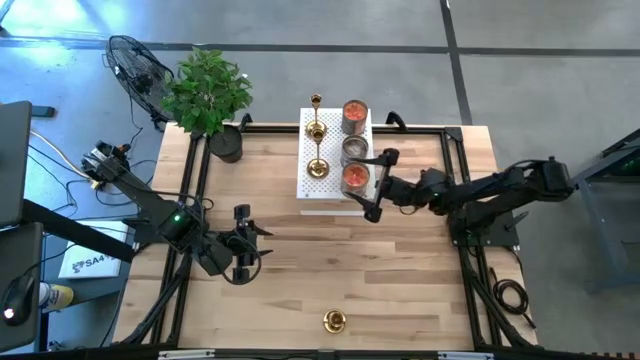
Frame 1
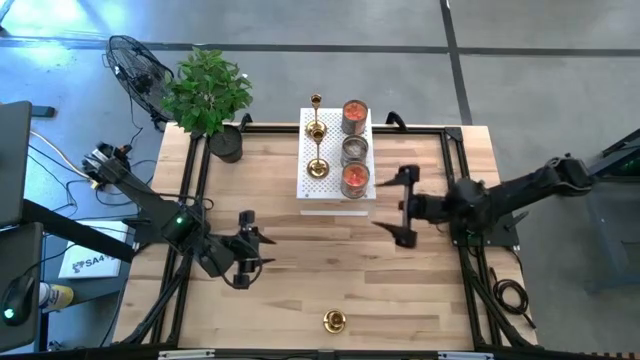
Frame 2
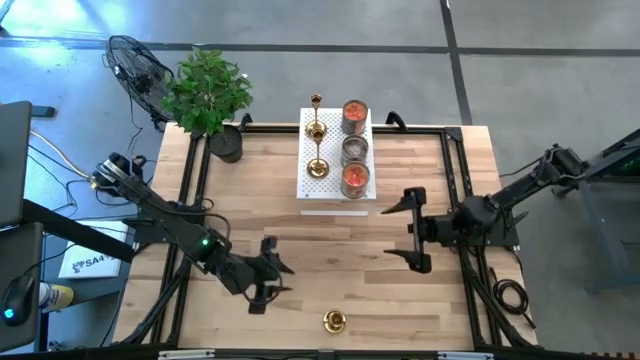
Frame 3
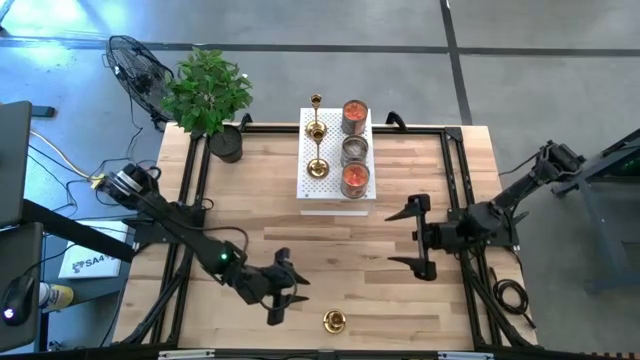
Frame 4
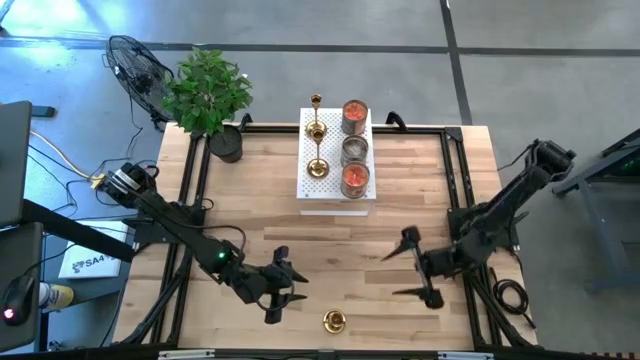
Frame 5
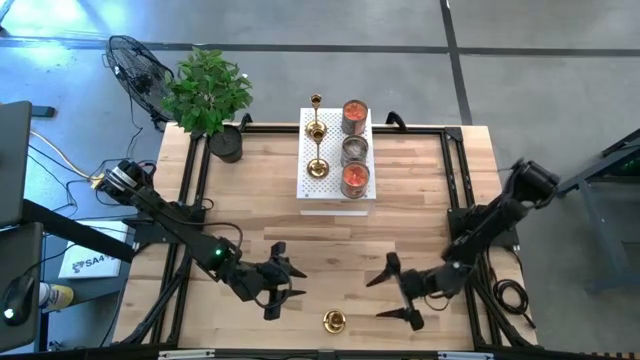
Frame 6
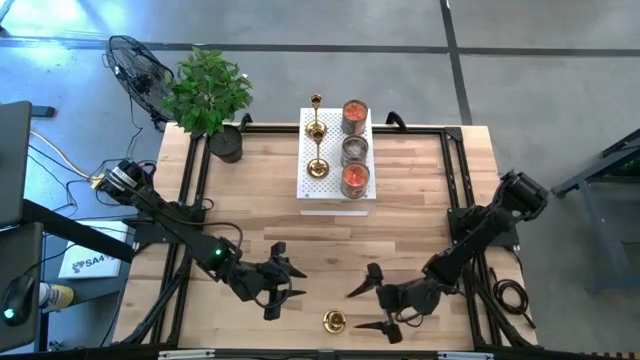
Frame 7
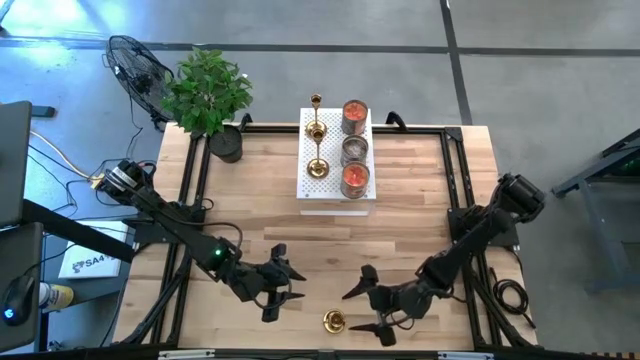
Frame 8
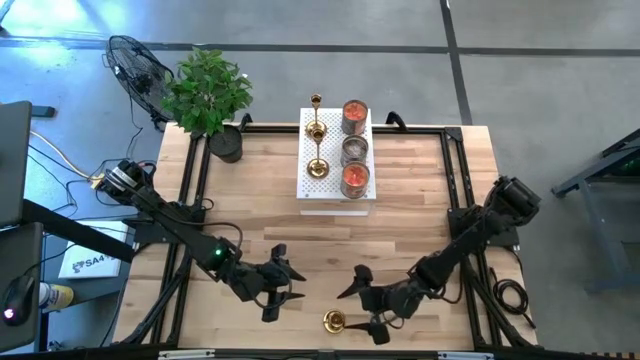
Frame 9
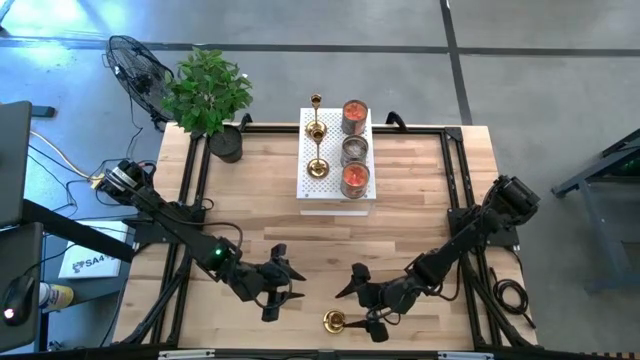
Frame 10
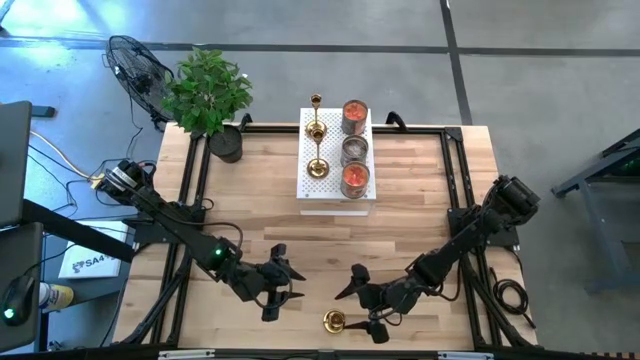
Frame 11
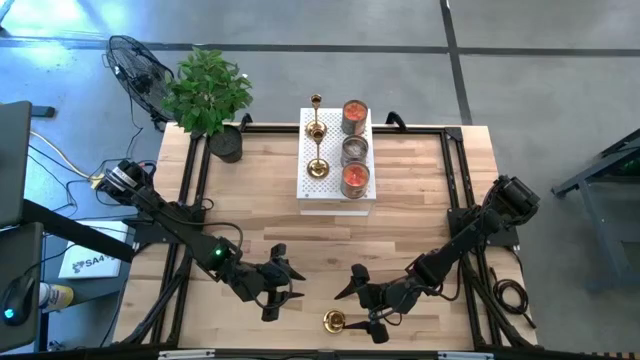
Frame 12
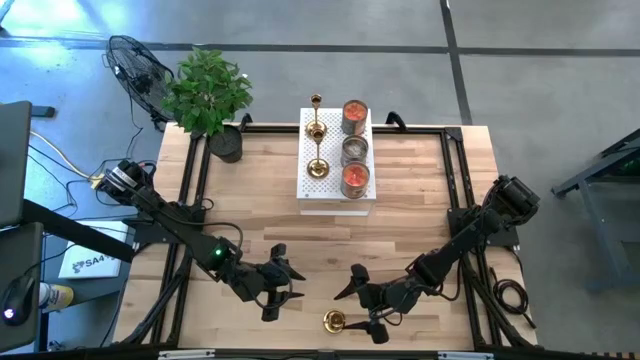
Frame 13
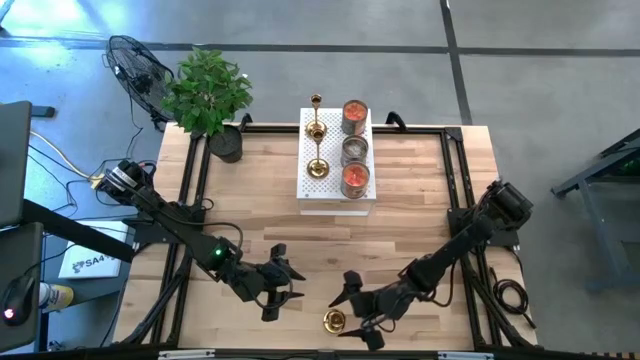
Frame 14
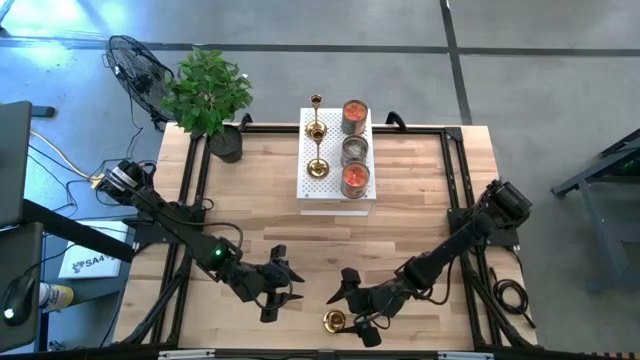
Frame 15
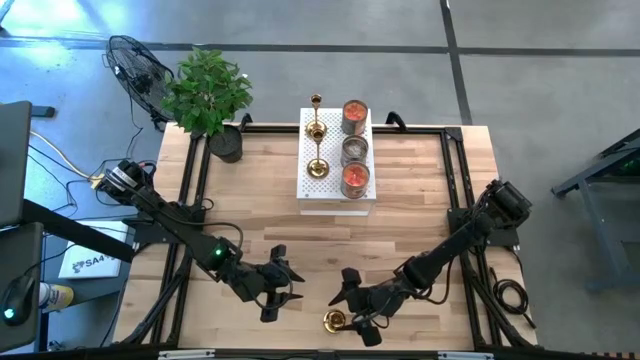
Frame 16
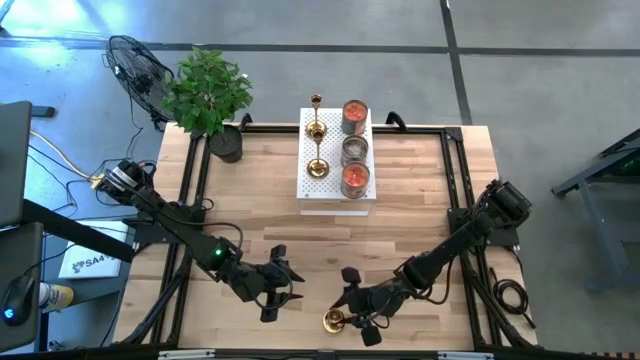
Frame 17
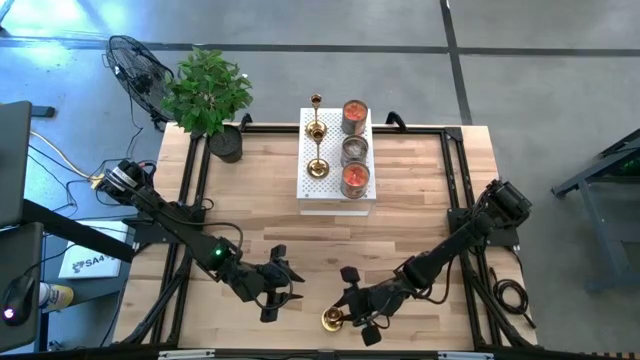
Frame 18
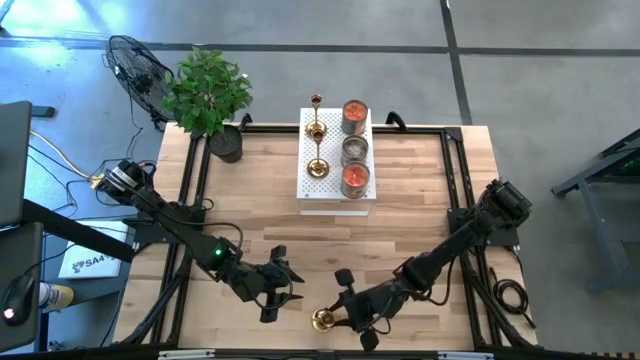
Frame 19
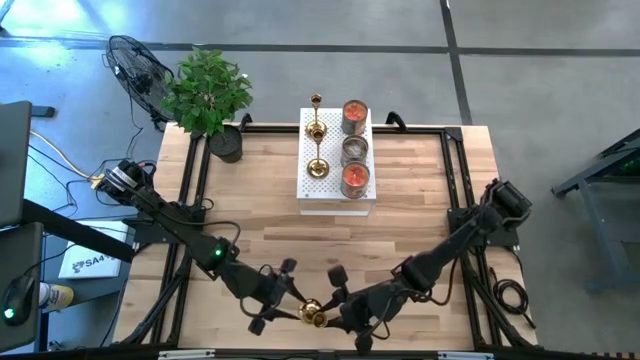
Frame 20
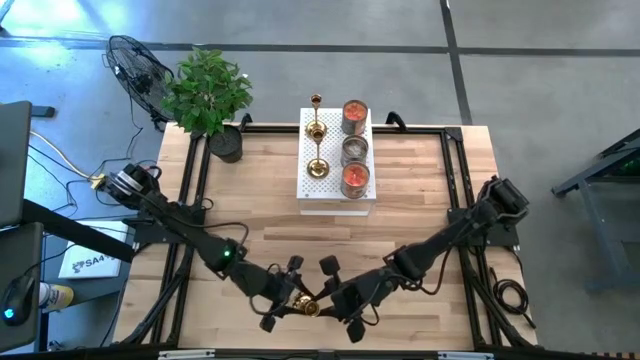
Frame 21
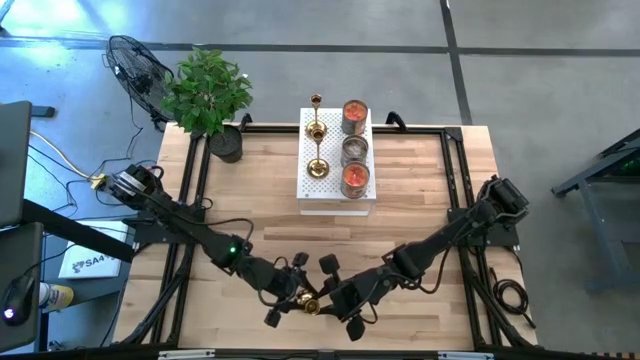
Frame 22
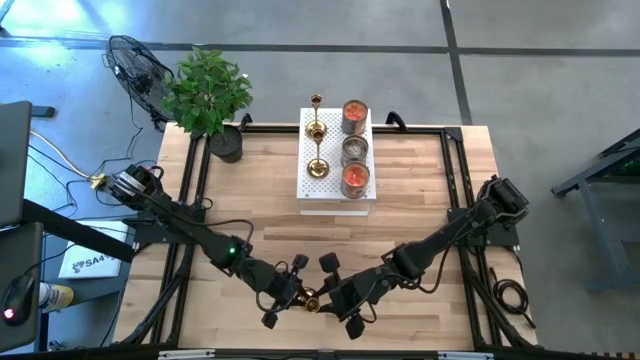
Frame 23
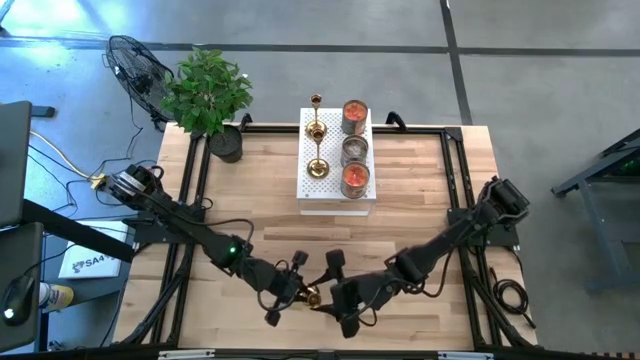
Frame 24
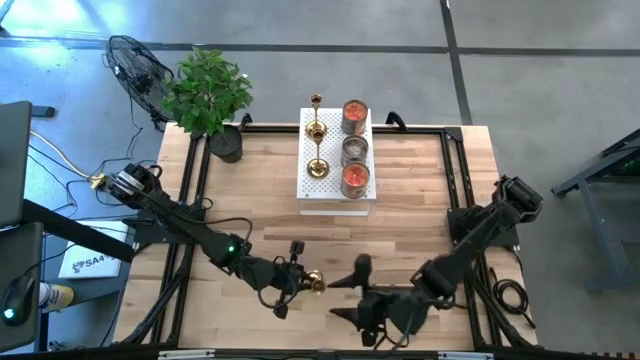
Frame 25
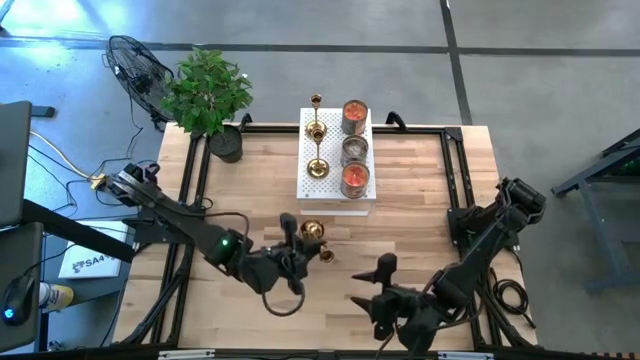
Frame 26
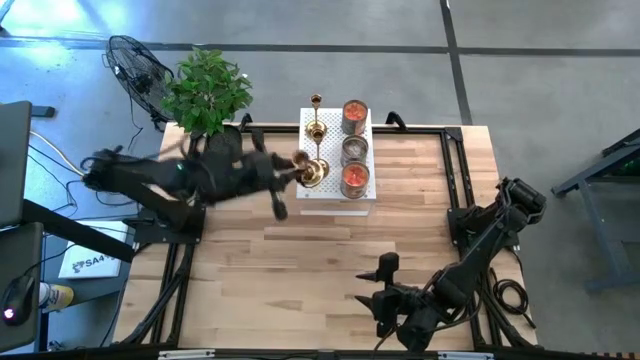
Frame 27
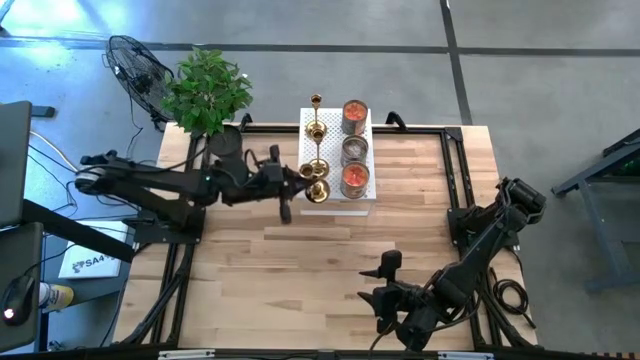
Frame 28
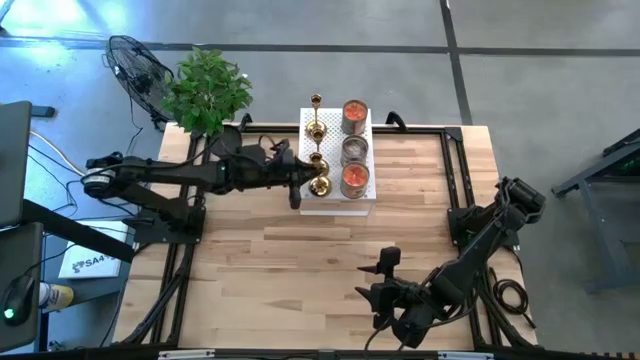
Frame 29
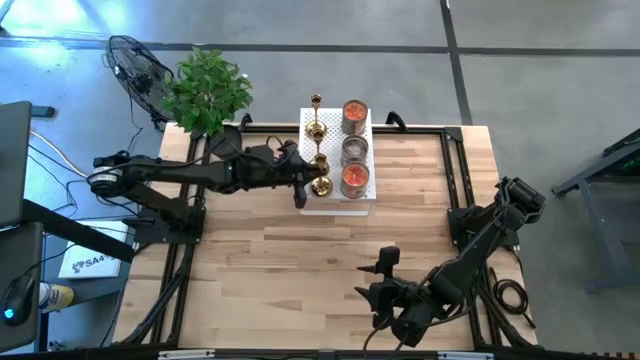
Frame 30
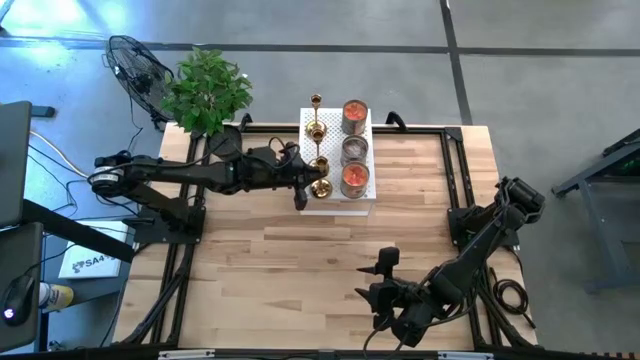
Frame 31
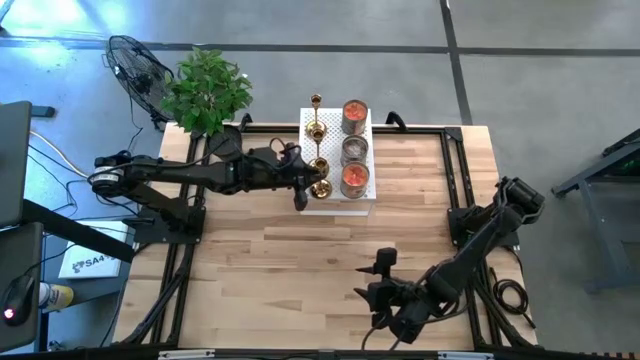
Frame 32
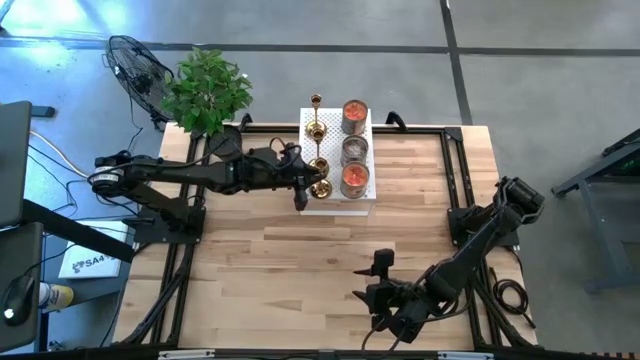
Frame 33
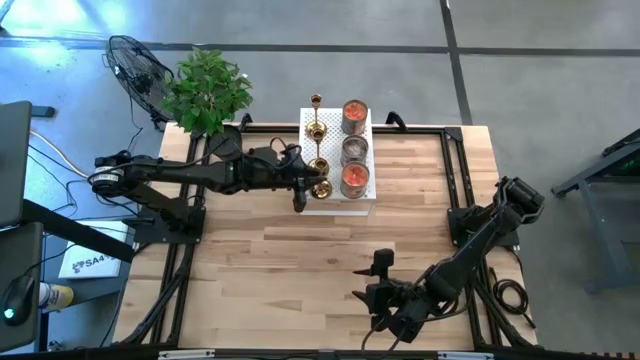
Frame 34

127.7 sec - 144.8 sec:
Task: Pick & Place candle stick holders
Put the gold candle holder on the shelf

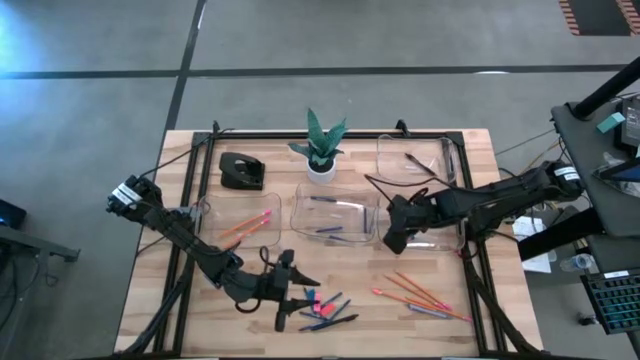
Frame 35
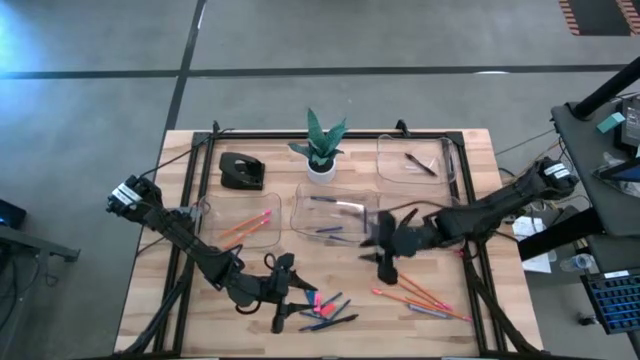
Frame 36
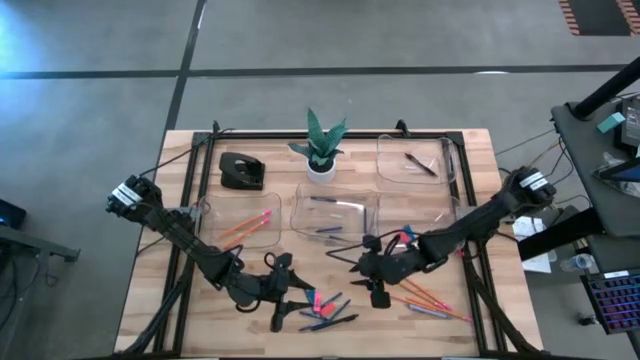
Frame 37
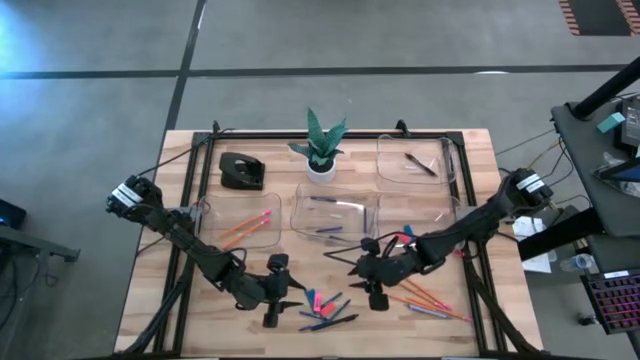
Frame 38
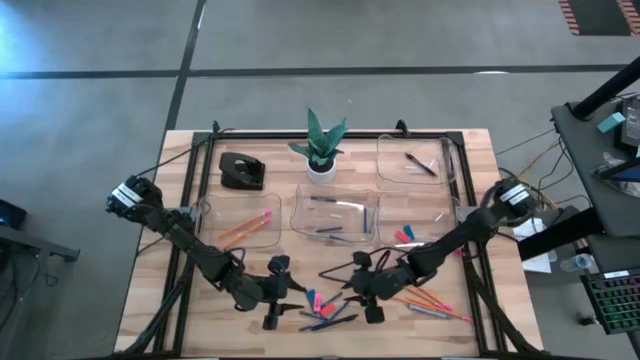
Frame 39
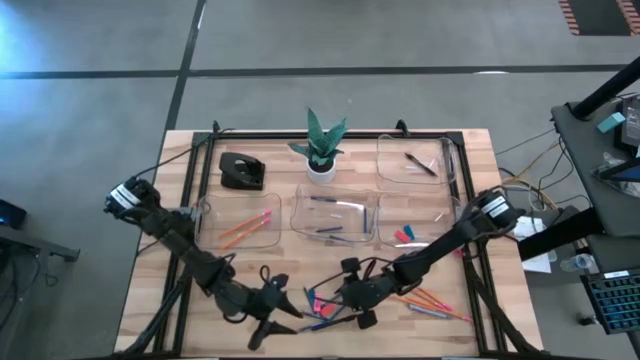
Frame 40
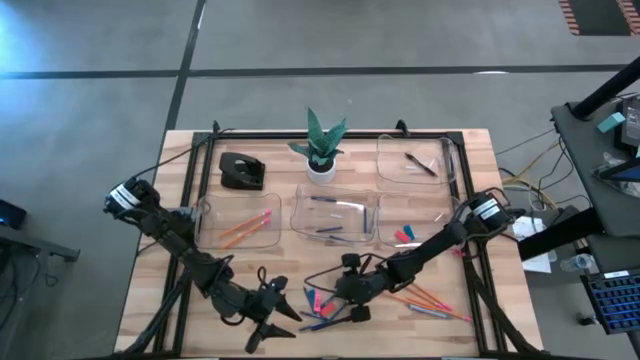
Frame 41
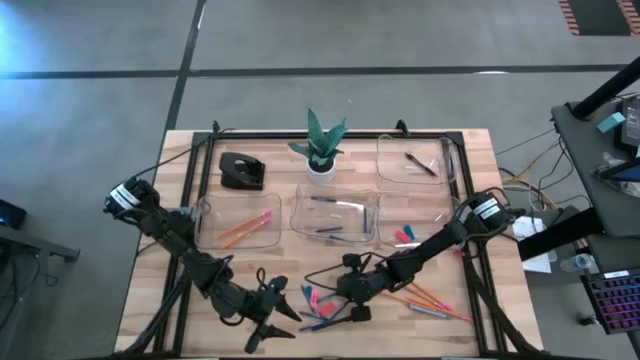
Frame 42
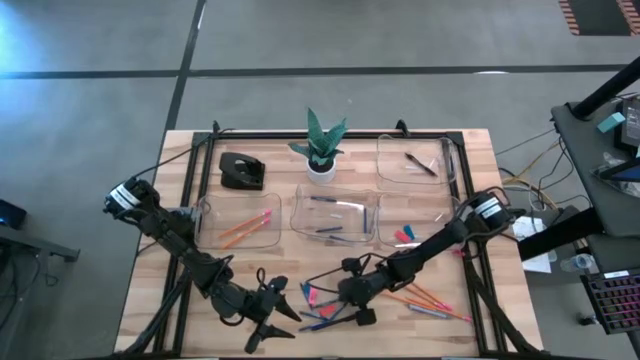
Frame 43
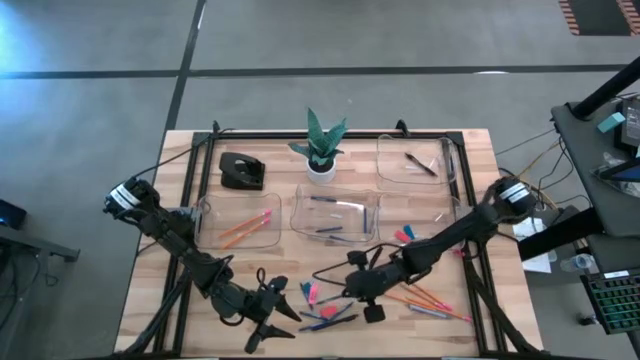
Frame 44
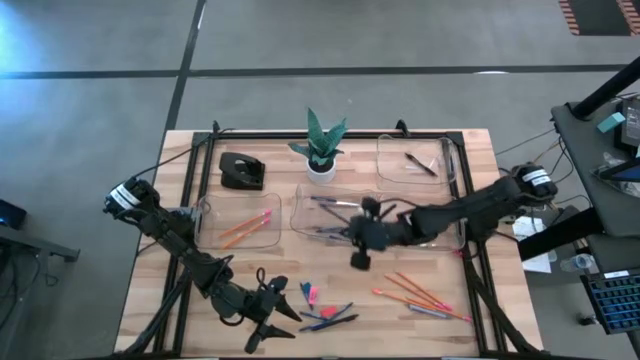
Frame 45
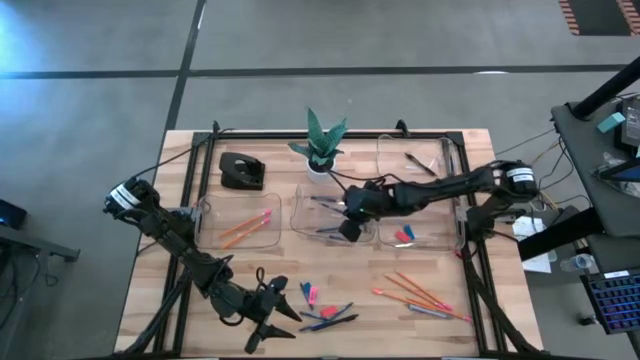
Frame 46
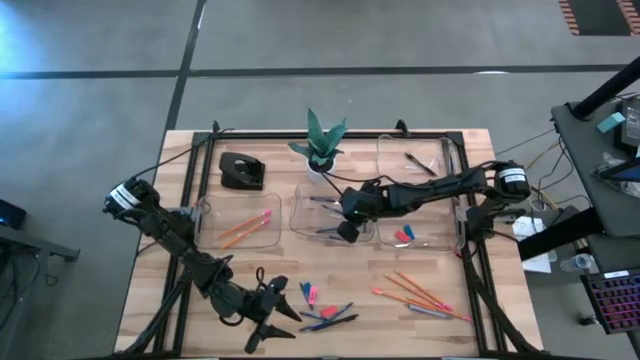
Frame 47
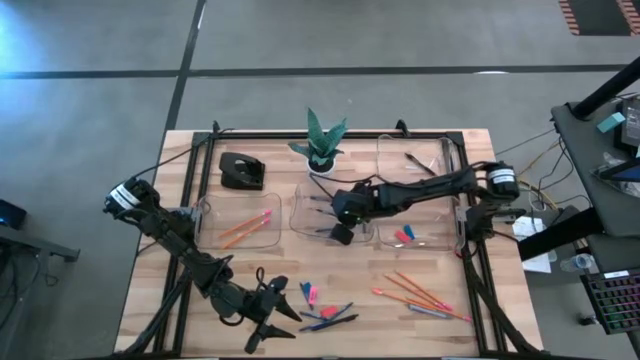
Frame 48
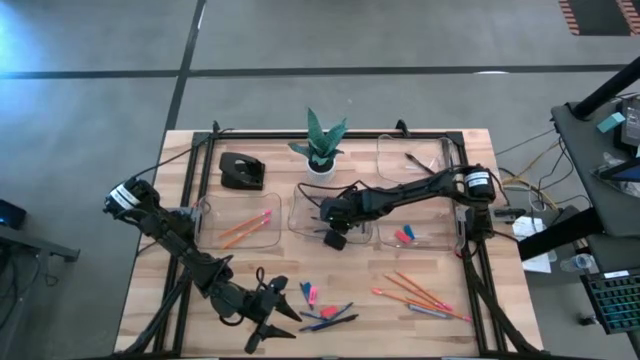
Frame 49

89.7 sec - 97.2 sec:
Task: Sort crayons/erasers/pens/pencils in bins
Put the blue crayon into the middle transparent bin
